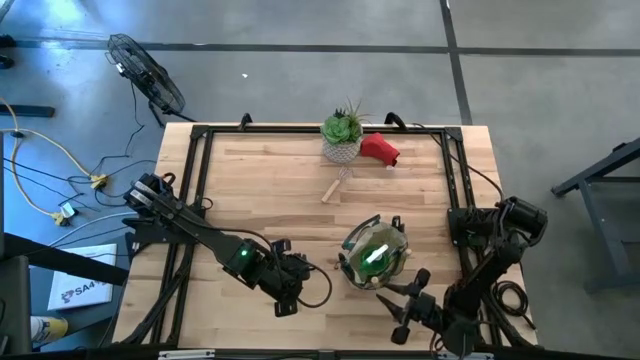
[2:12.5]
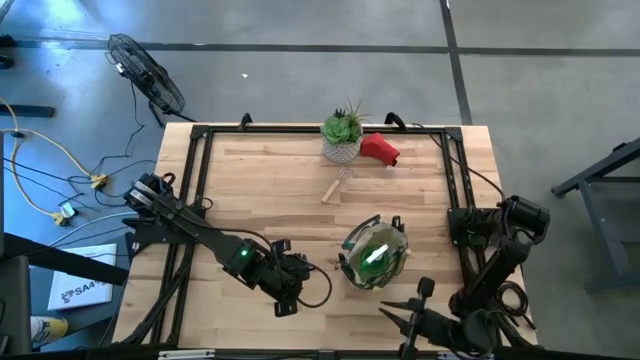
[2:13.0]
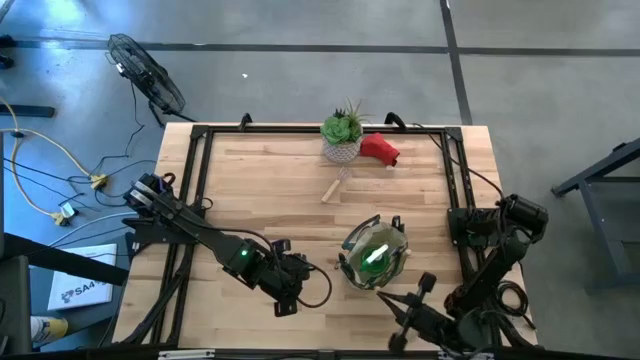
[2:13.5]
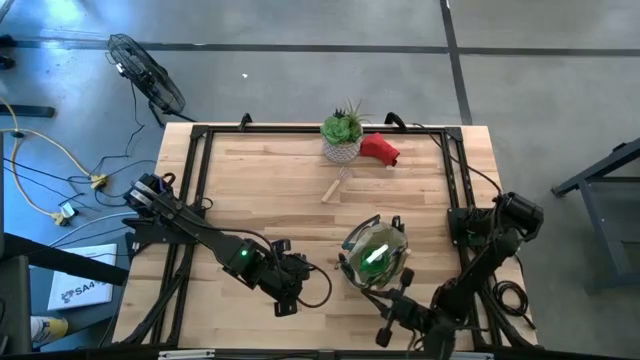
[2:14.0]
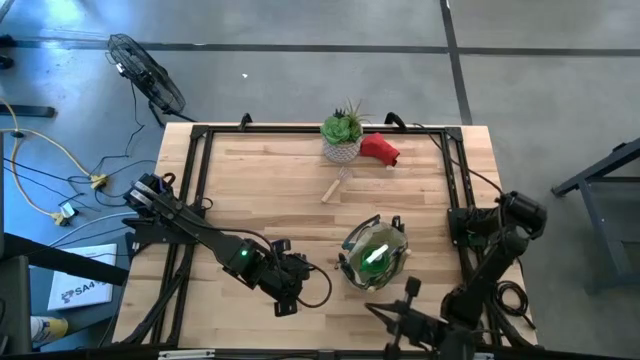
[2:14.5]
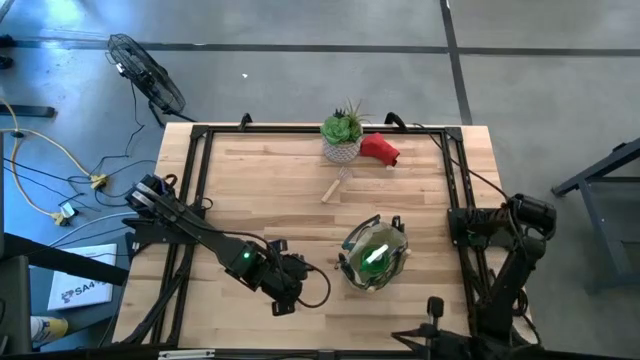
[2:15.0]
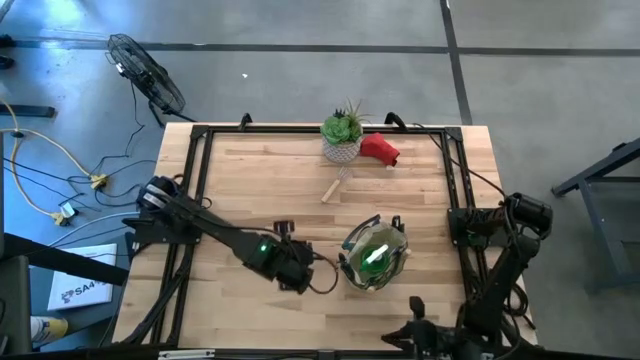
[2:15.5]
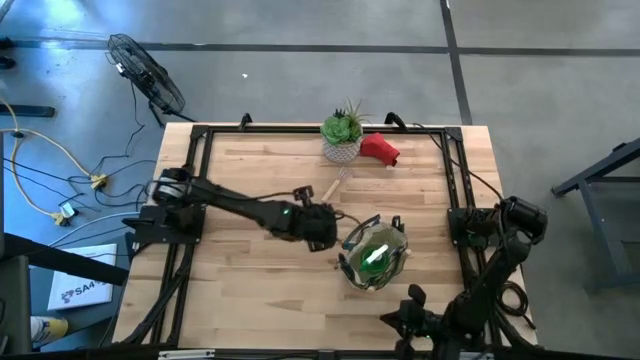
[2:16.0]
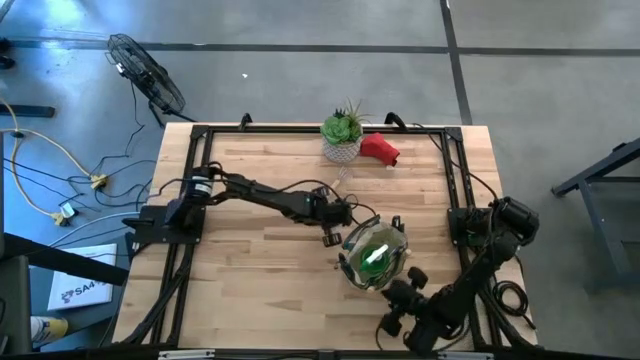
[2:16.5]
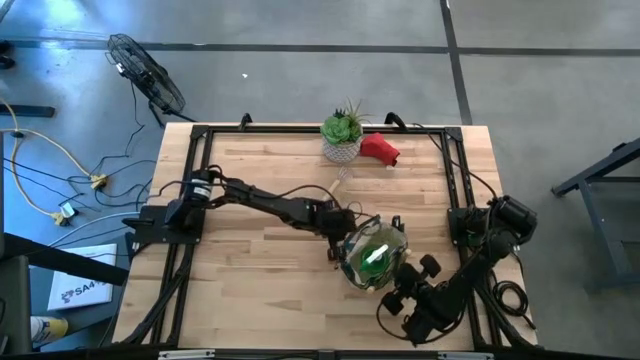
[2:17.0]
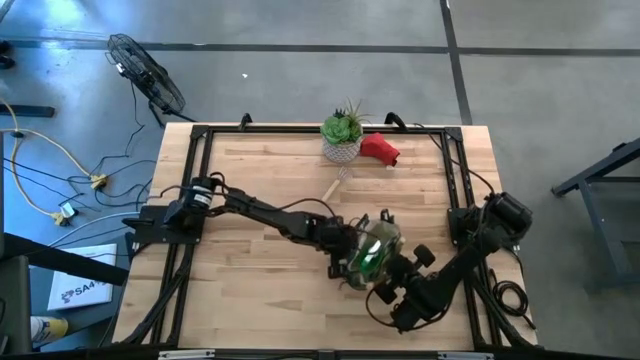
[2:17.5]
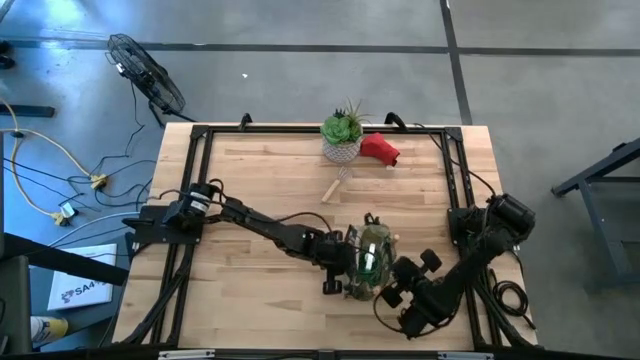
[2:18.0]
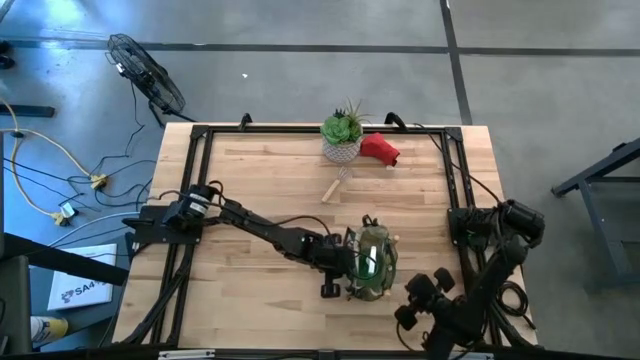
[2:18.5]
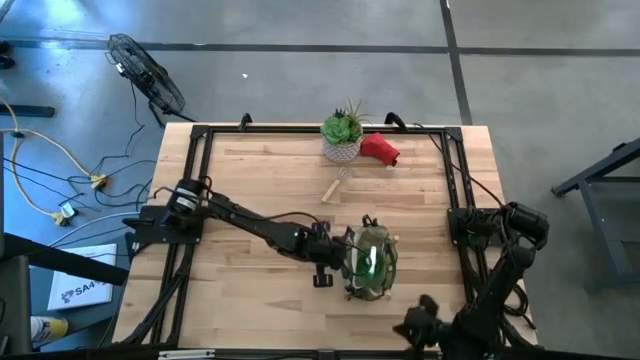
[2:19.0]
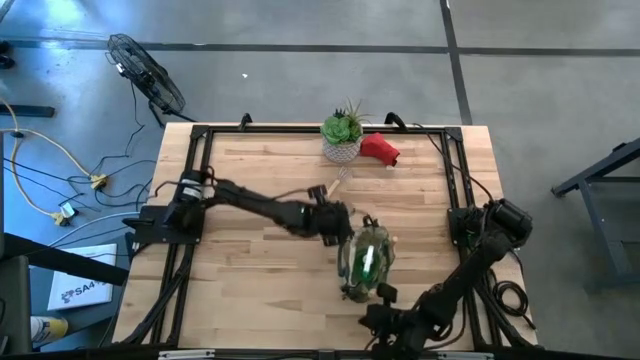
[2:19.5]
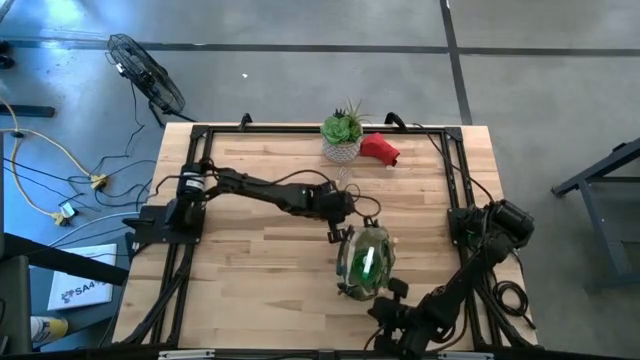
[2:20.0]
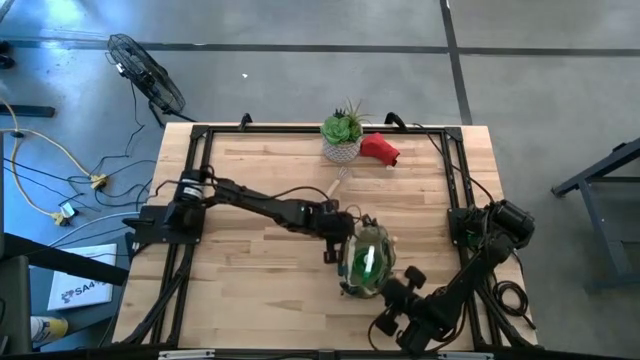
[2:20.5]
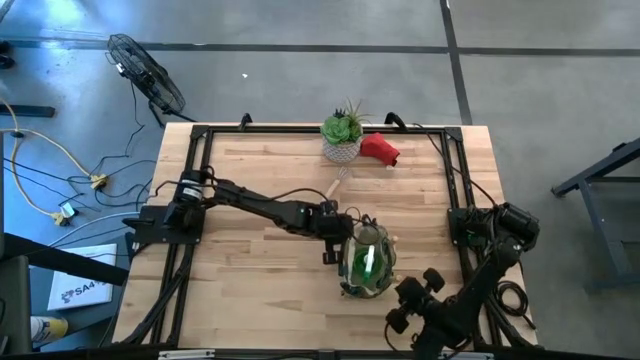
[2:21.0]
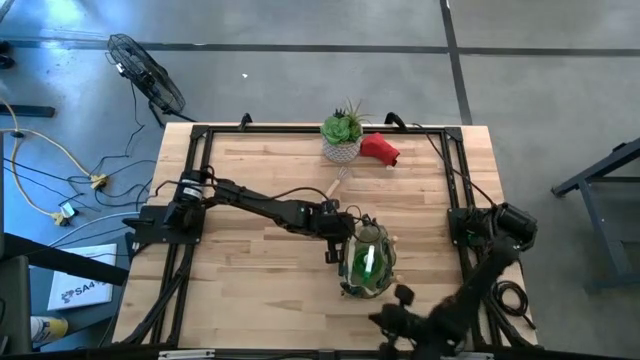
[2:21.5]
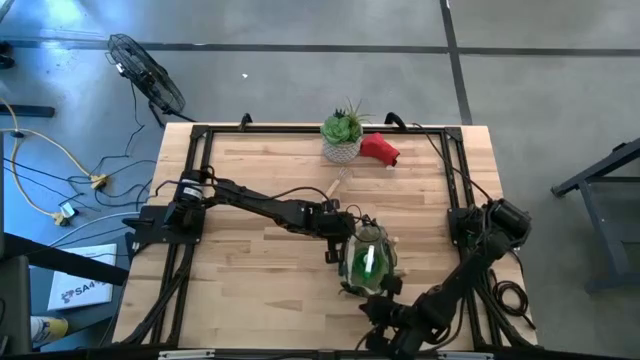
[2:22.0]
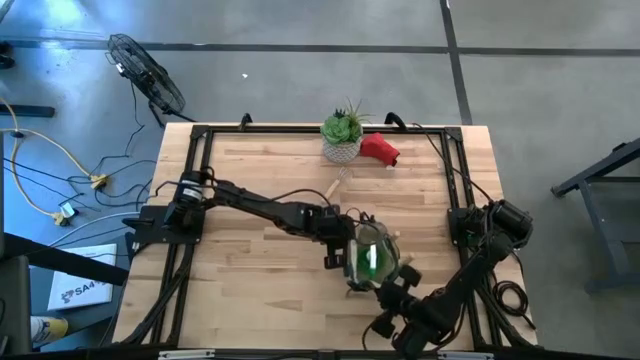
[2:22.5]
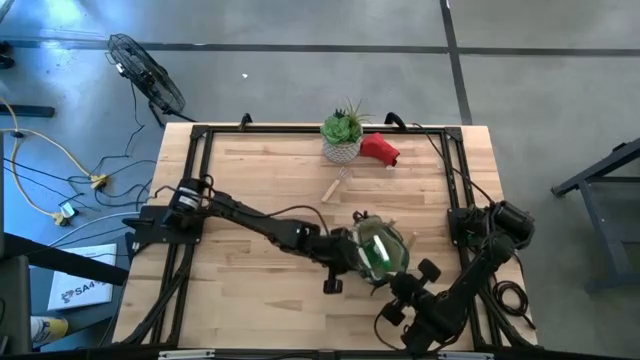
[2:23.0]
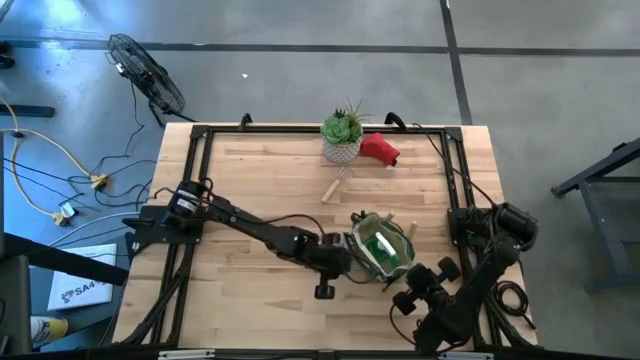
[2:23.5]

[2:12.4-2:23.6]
Task: Pick & Place Garden tools in Gardening bag
Adjust the gardening bag

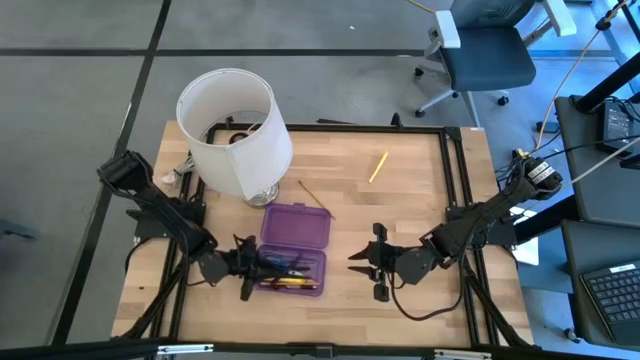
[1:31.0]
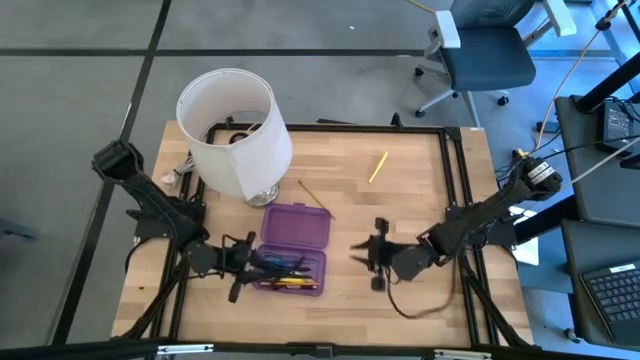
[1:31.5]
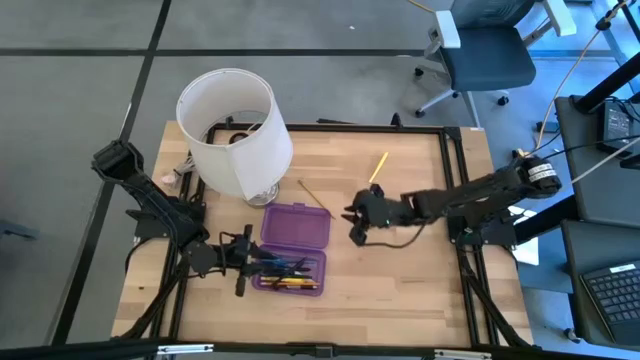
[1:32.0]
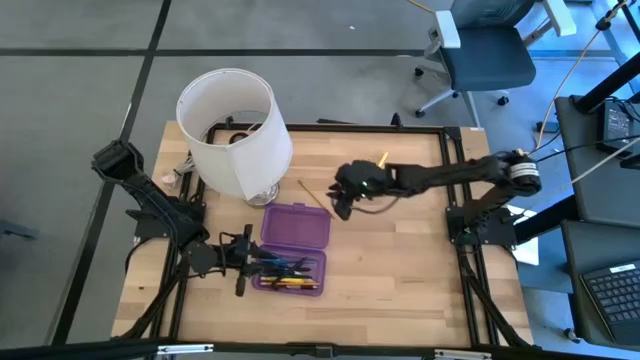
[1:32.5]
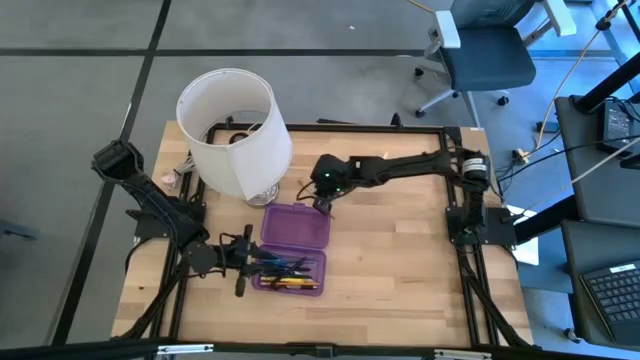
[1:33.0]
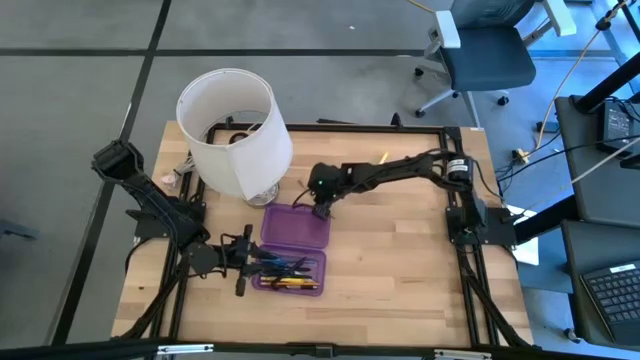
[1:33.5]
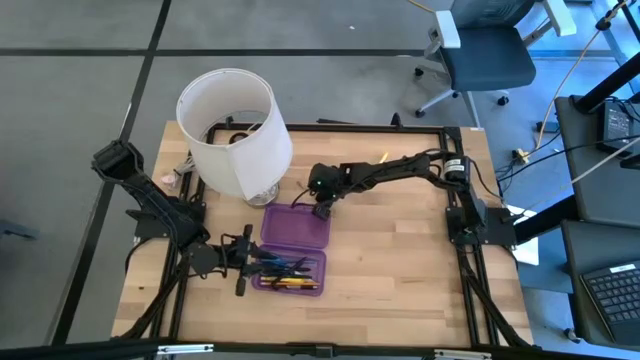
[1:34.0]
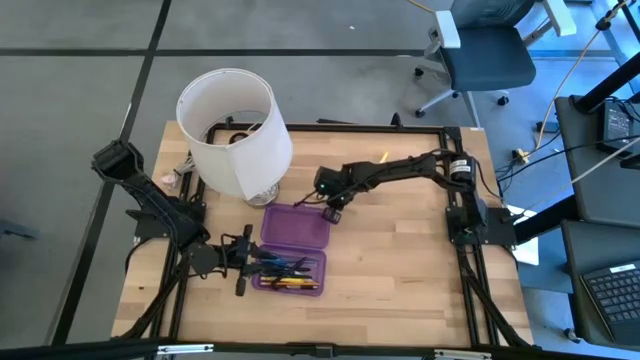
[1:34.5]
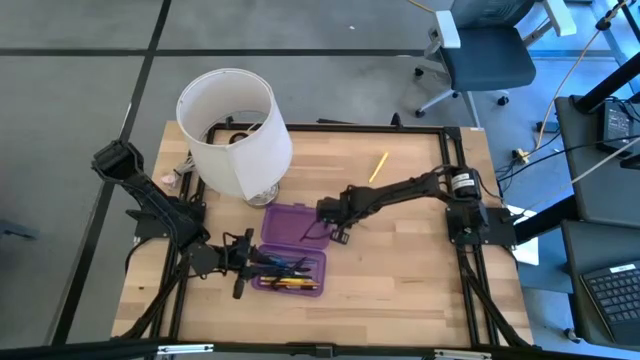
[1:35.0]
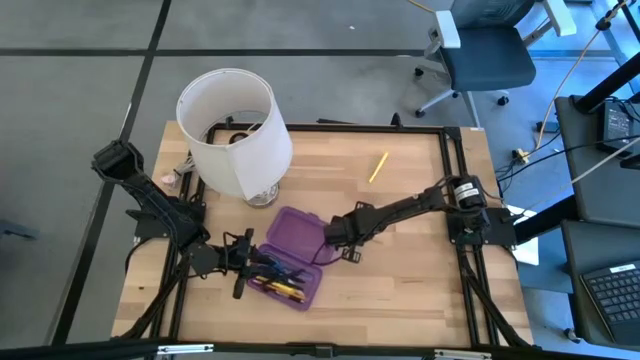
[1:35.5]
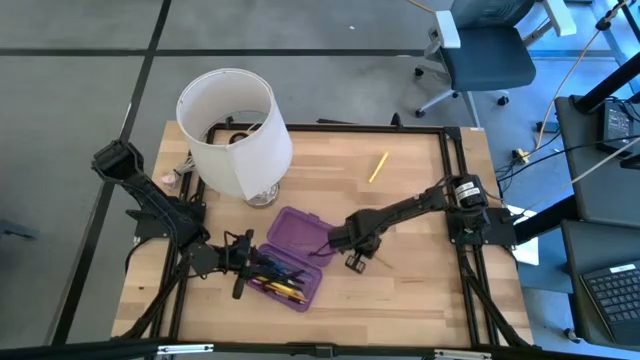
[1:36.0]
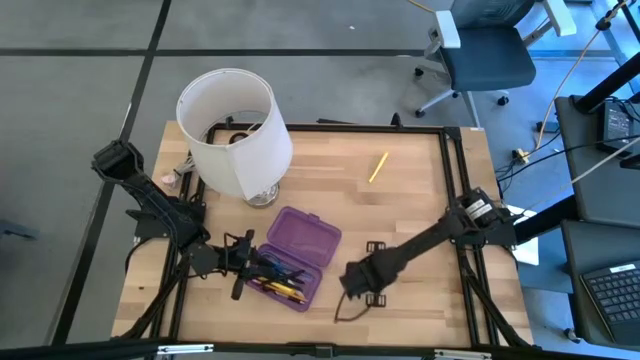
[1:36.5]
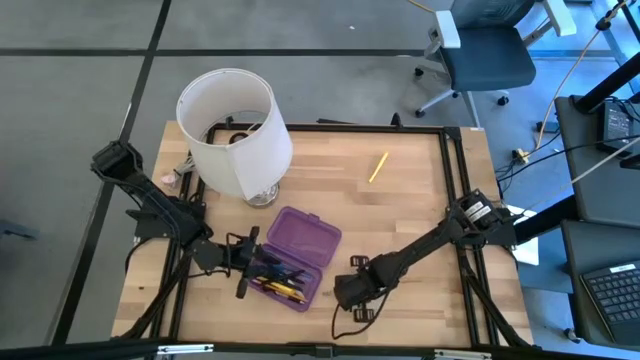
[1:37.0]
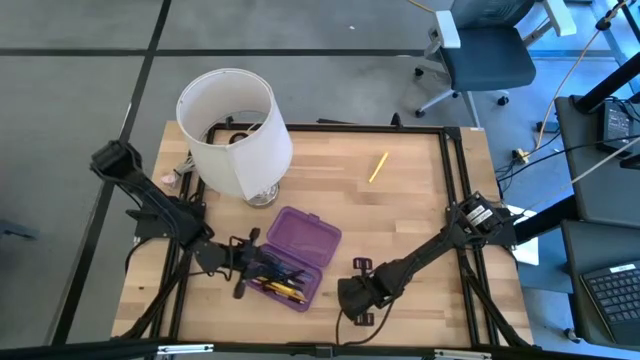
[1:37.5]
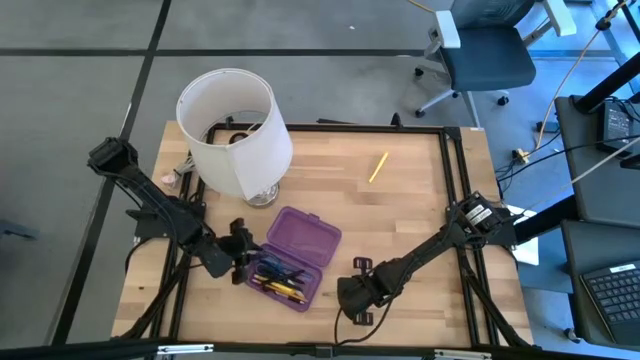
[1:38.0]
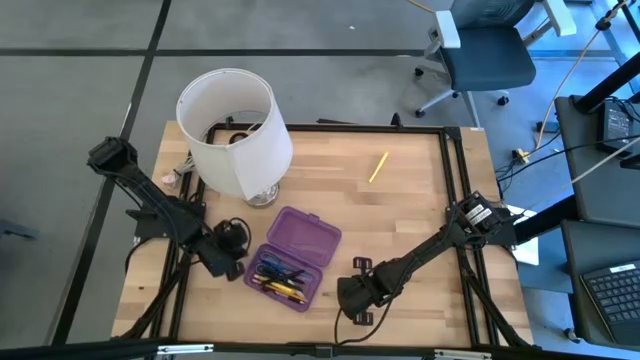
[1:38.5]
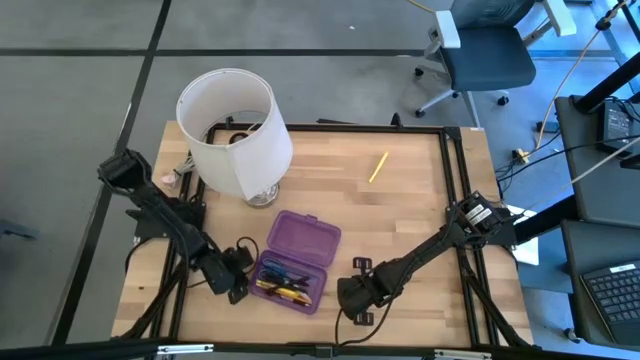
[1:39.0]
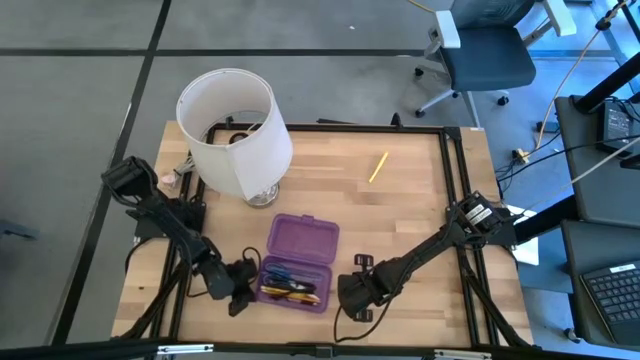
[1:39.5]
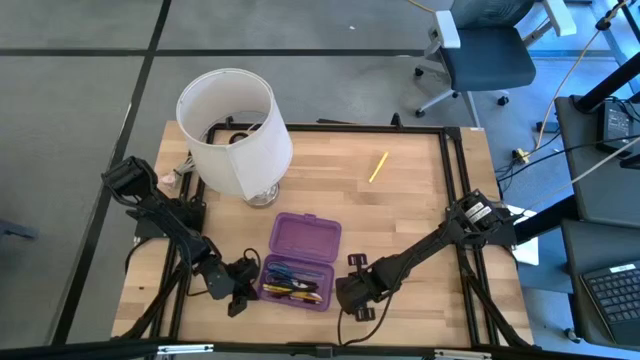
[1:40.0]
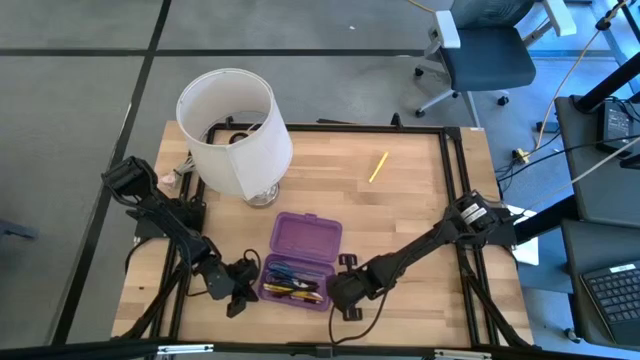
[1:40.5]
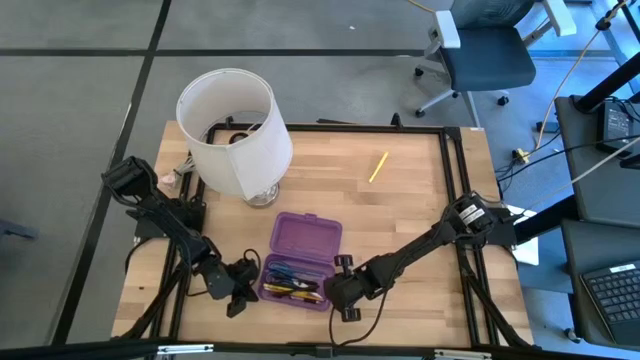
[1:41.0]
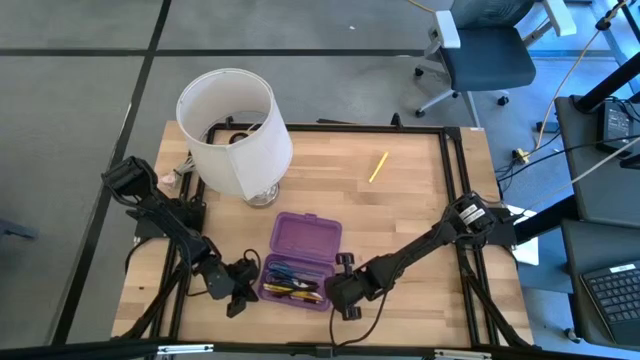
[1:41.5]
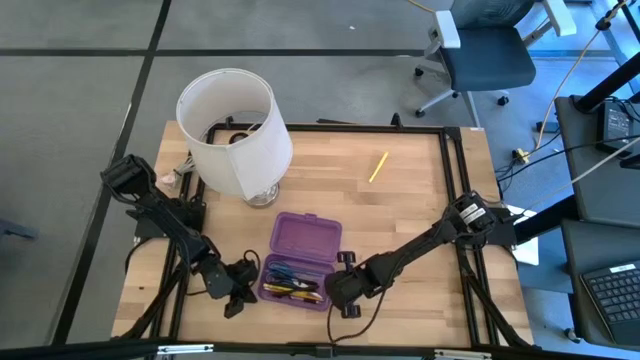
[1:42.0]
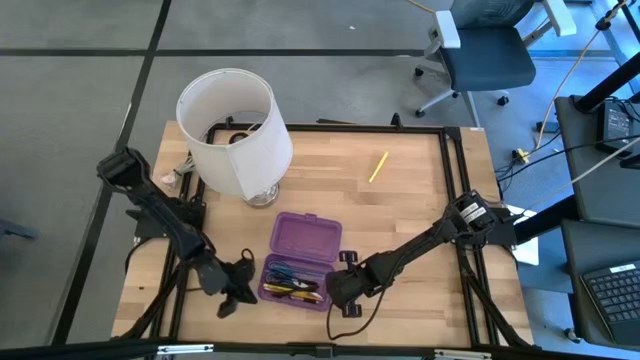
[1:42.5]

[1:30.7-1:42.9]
Task: Pick & place school supplies into a supply box
Put the yellow pencil into the purple supply box
